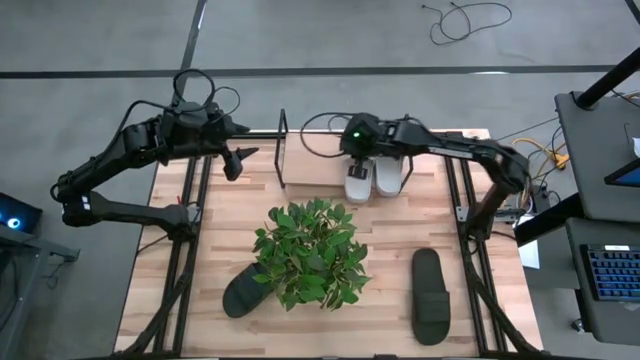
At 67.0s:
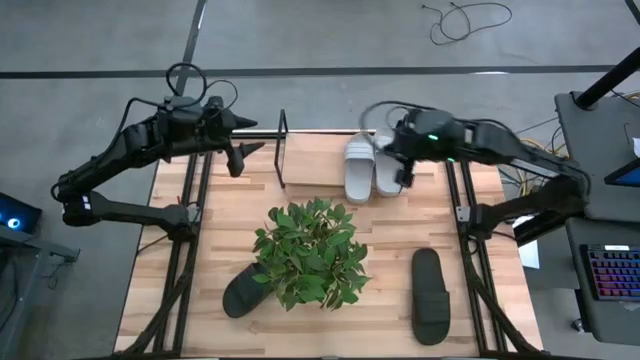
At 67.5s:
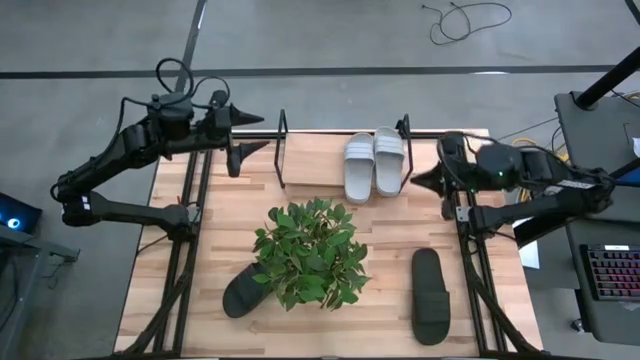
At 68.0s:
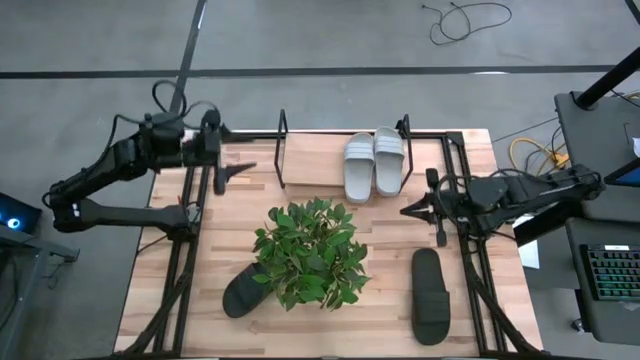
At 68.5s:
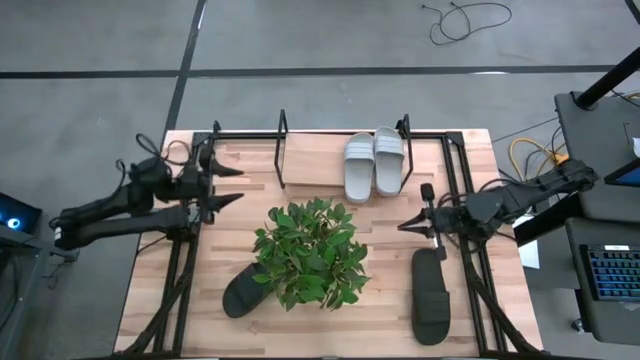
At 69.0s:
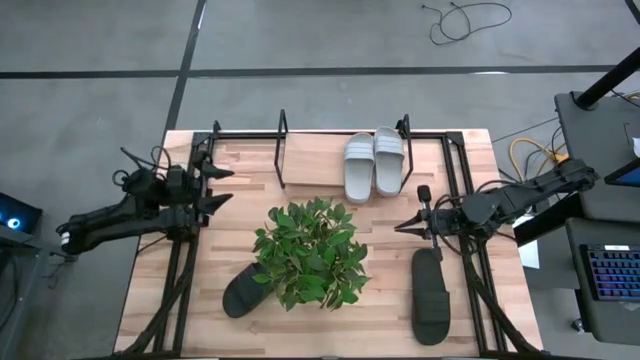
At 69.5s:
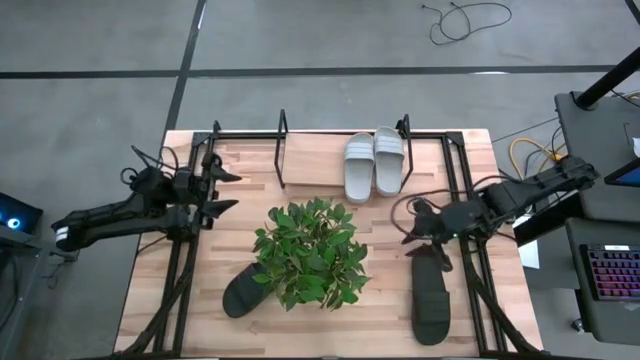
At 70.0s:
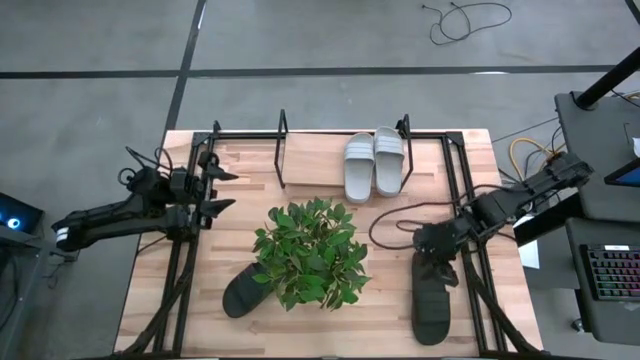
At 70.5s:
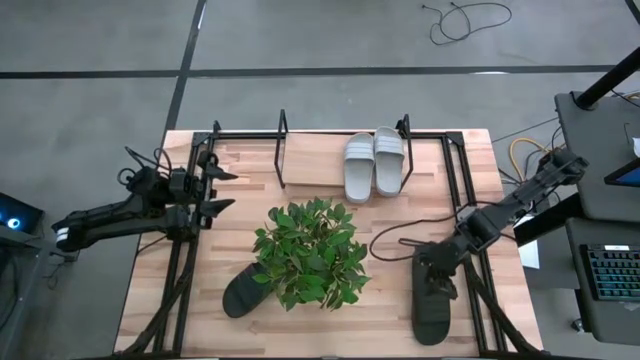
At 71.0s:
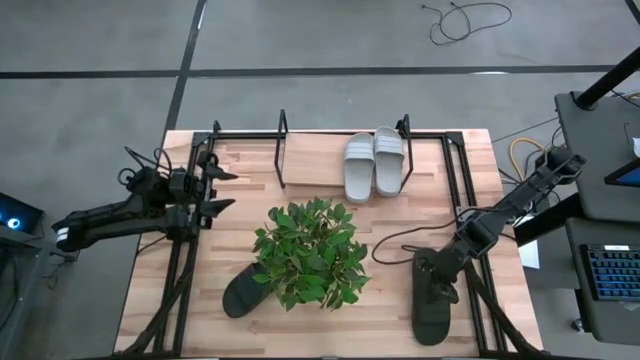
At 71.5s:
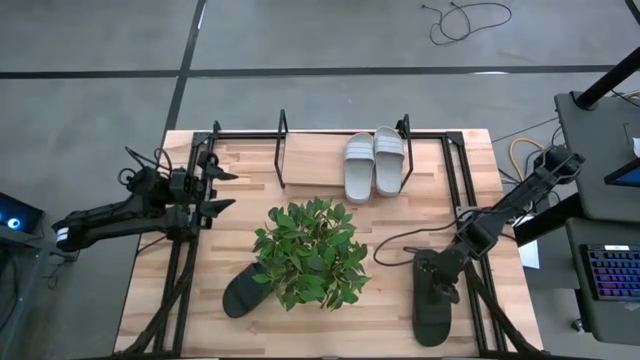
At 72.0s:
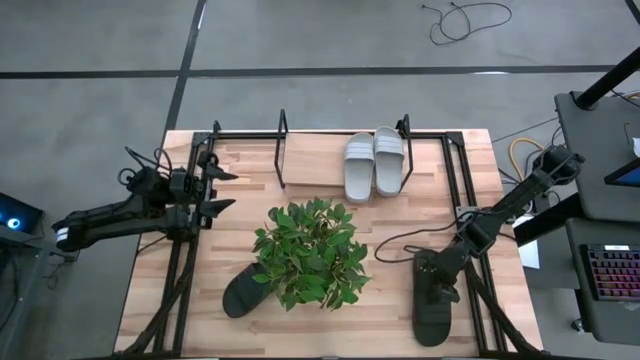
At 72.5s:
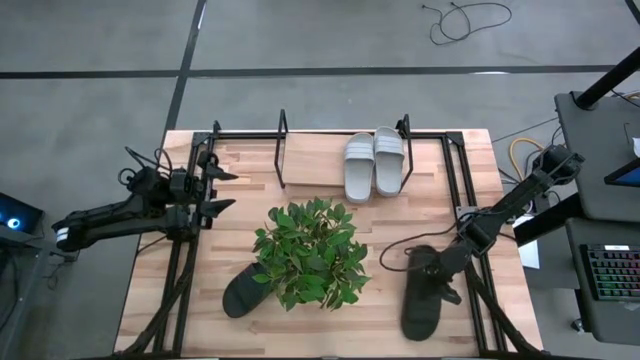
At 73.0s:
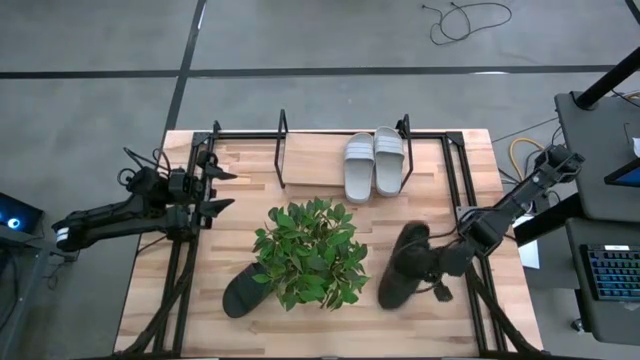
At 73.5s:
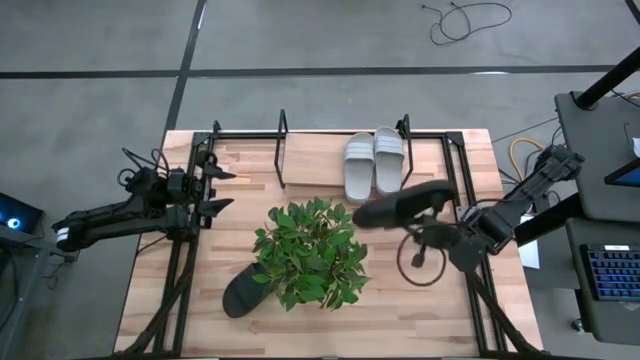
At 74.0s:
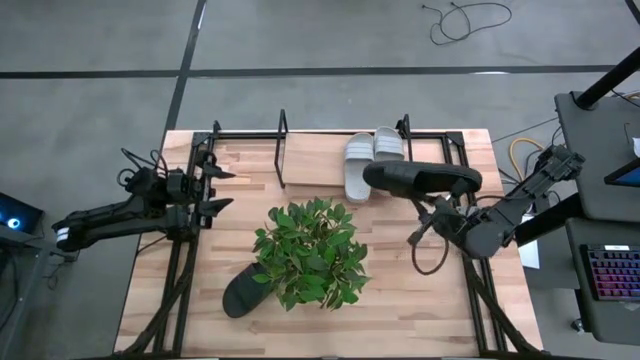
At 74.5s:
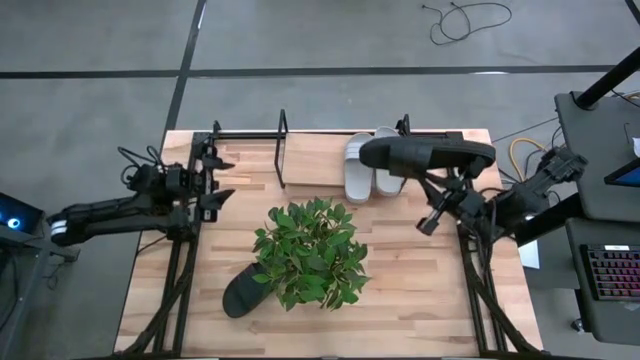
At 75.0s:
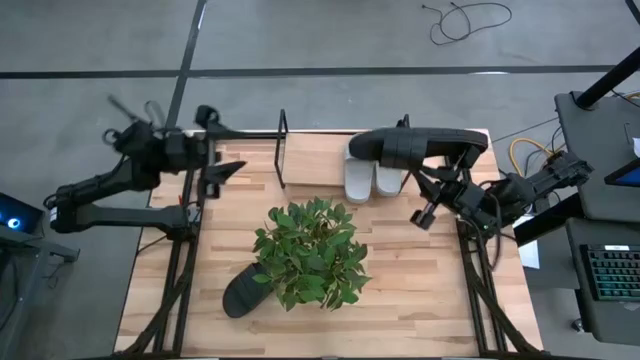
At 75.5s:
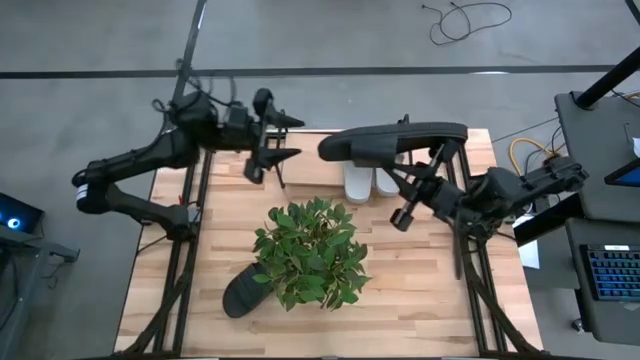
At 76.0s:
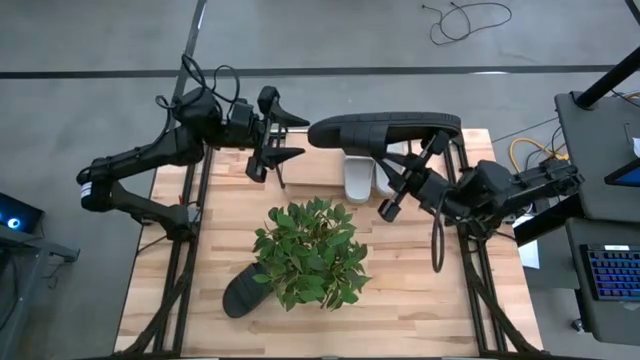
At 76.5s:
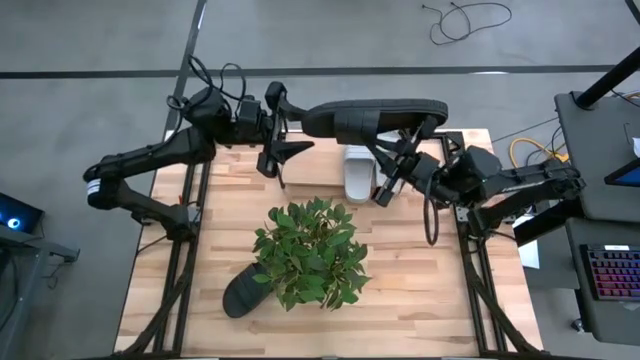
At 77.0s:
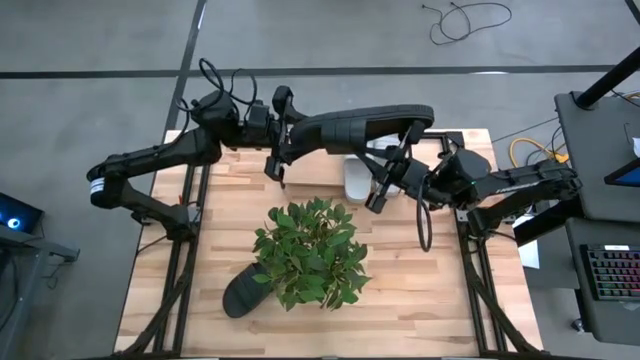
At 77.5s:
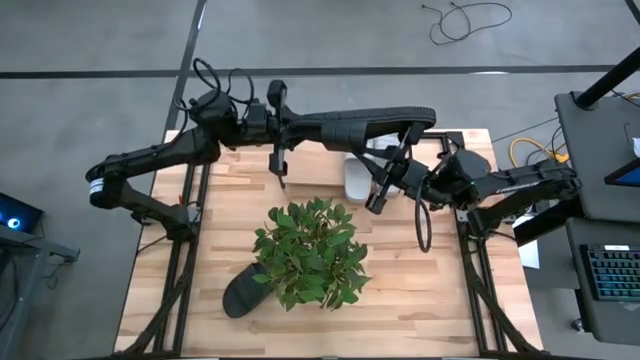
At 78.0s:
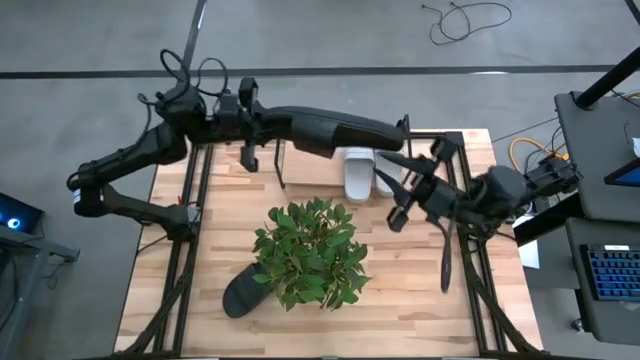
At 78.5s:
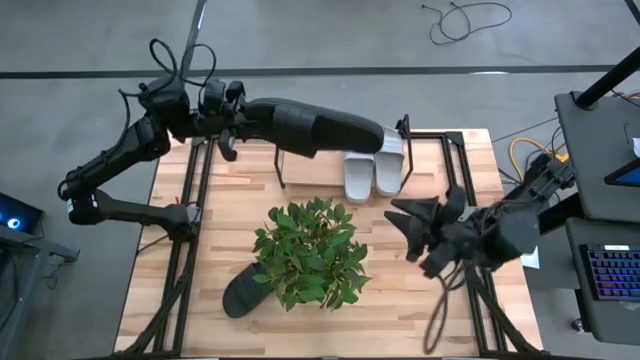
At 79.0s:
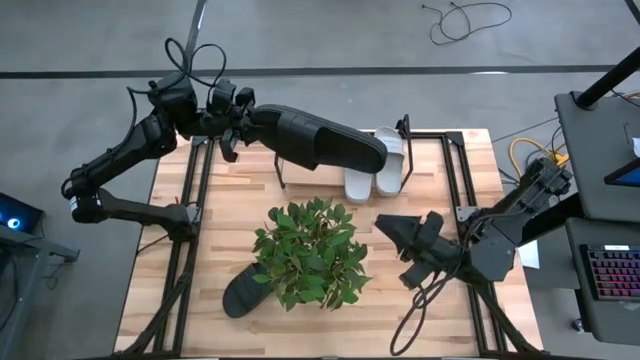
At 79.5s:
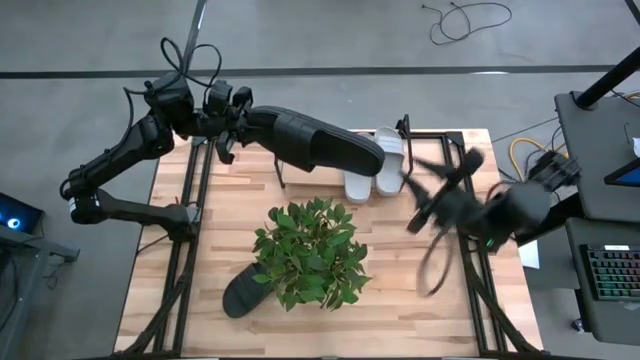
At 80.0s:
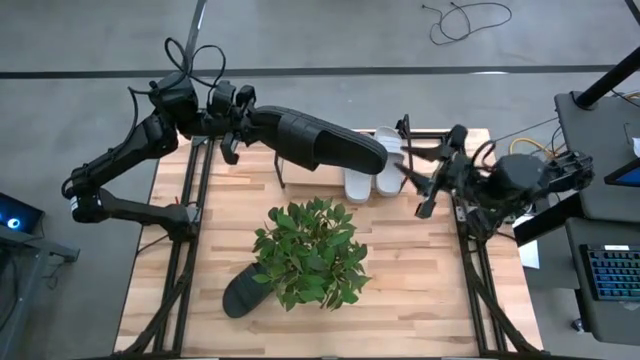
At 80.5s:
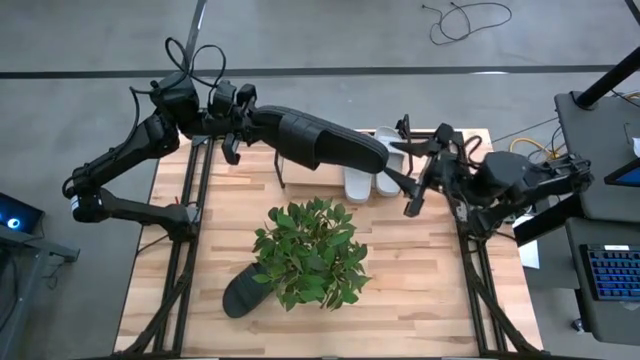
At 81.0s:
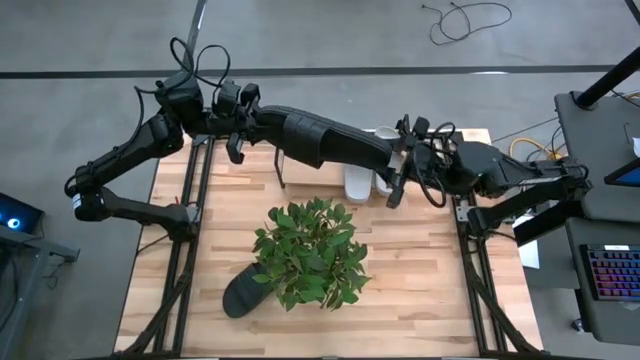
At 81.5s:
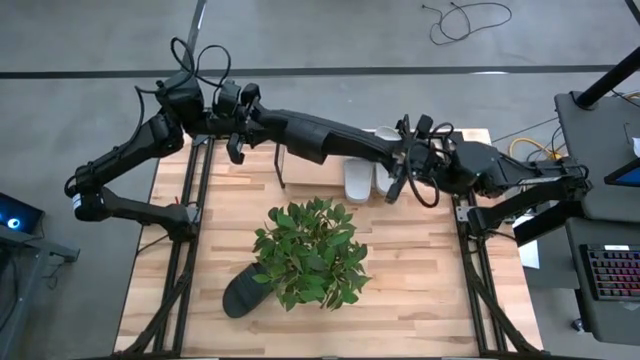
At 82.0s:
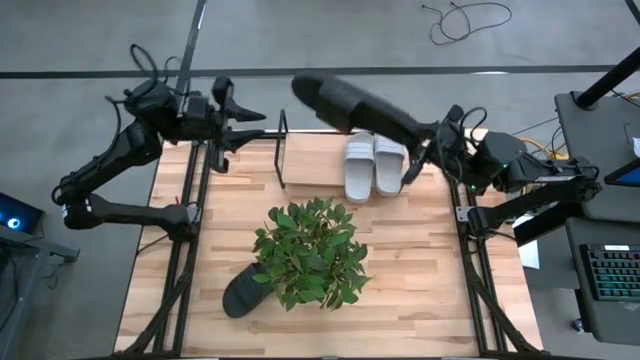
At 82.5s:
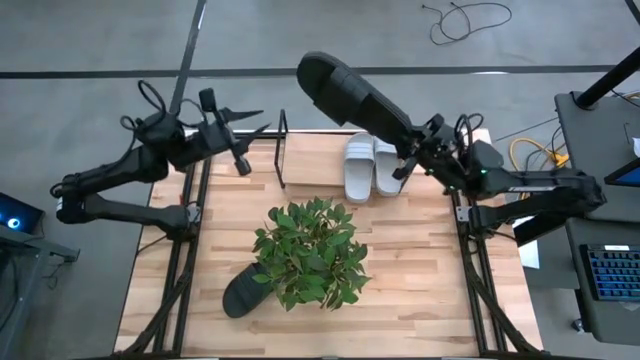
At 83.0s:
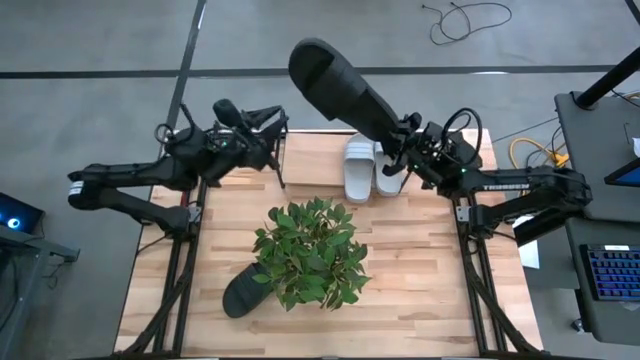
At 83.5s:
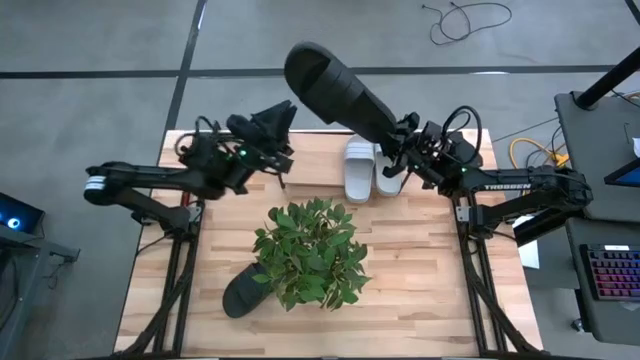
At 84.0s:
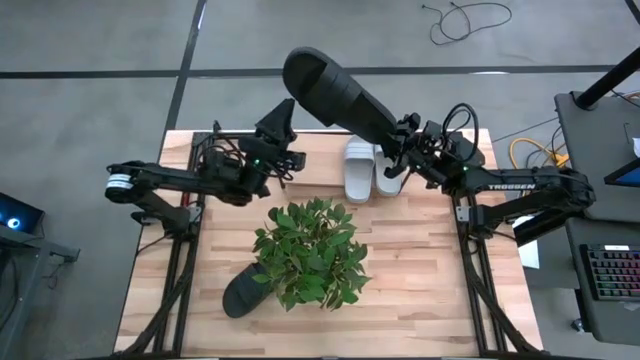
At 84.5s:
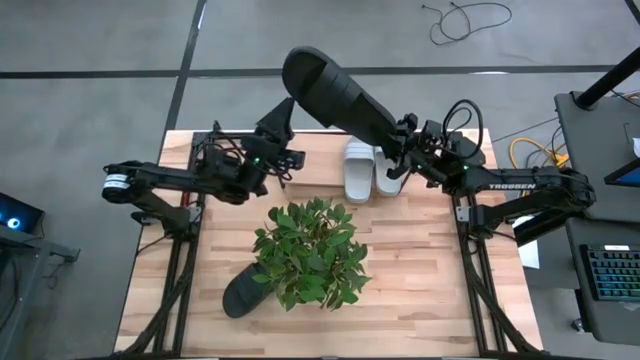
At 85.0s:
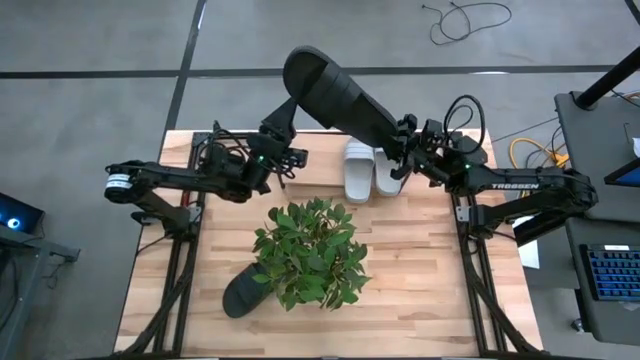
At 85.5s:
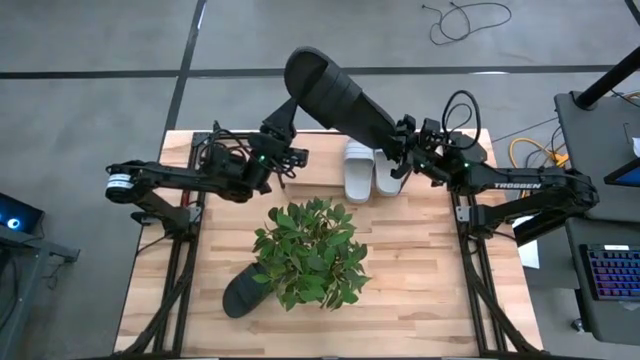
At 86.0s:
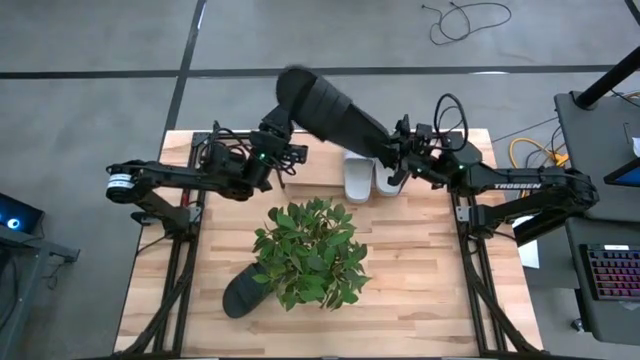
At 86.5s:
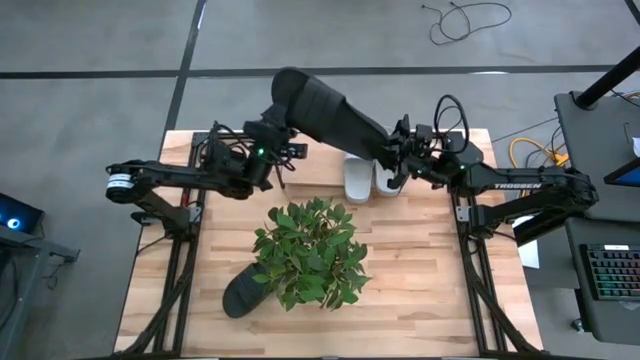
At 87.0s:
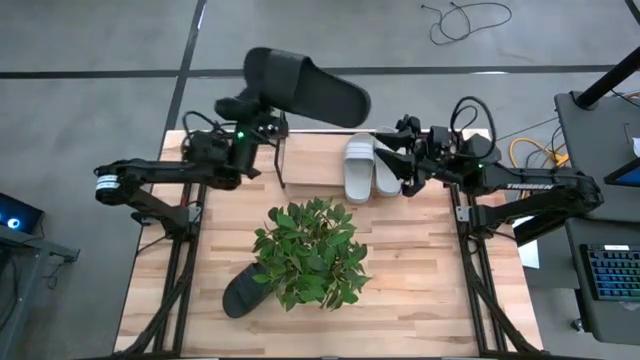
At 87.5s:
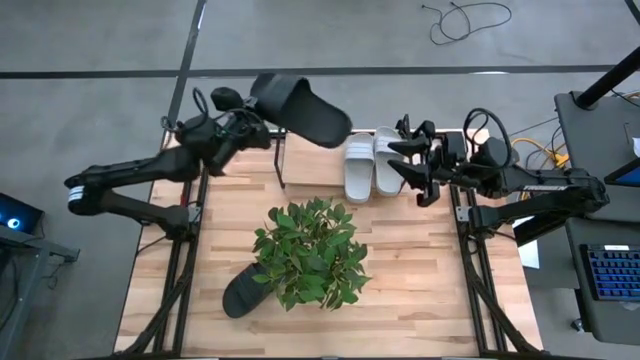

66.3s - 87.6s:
Task: Pick and place slides into the shelf
Put the right black slide on the shelf
